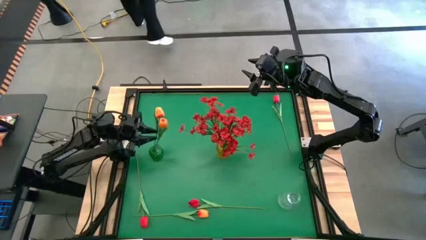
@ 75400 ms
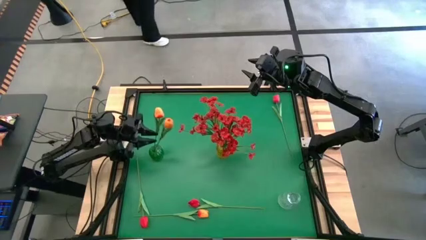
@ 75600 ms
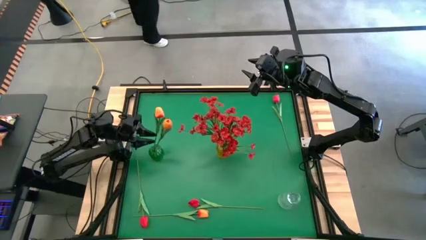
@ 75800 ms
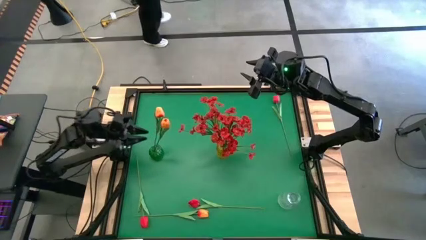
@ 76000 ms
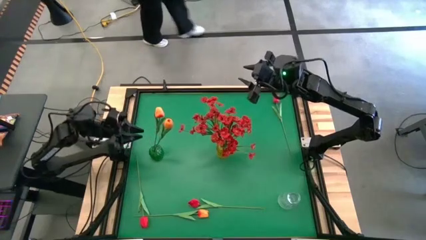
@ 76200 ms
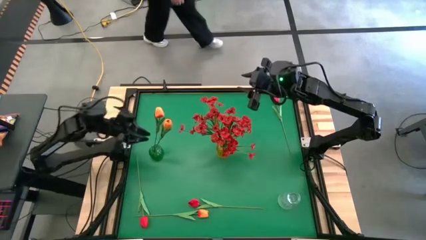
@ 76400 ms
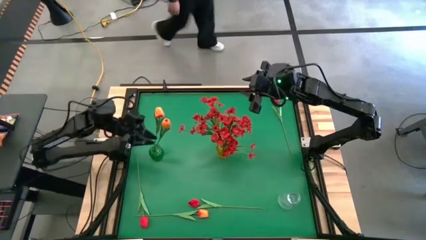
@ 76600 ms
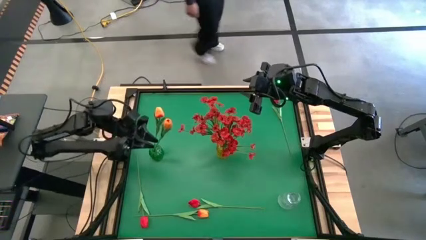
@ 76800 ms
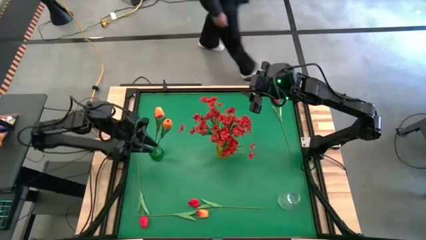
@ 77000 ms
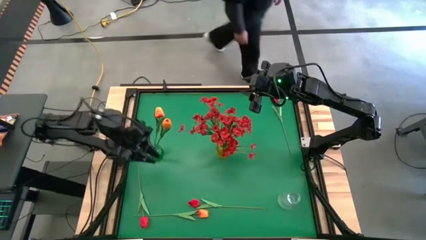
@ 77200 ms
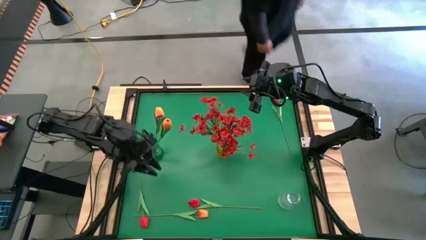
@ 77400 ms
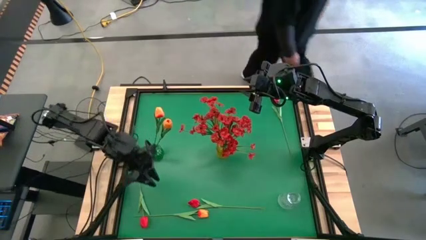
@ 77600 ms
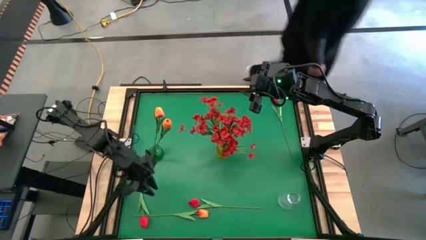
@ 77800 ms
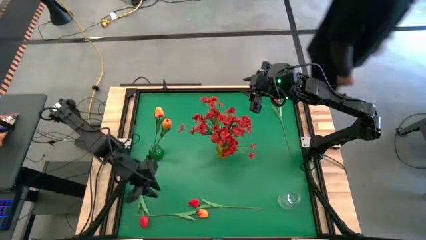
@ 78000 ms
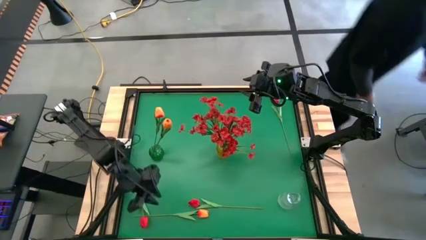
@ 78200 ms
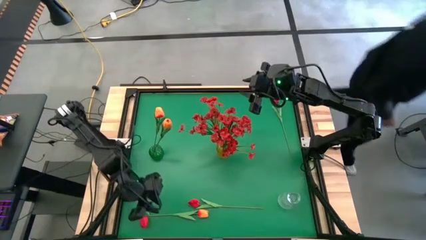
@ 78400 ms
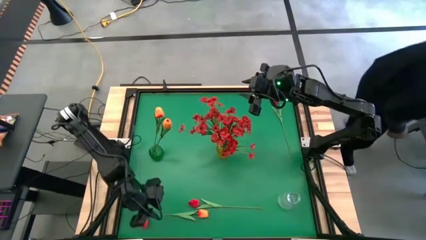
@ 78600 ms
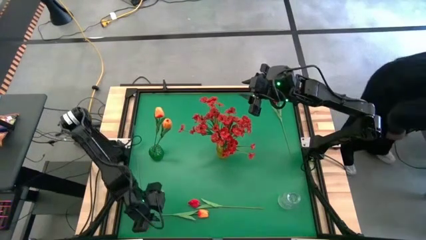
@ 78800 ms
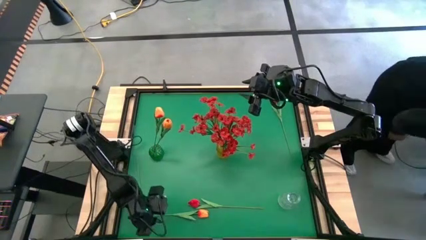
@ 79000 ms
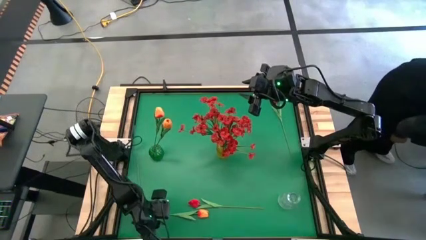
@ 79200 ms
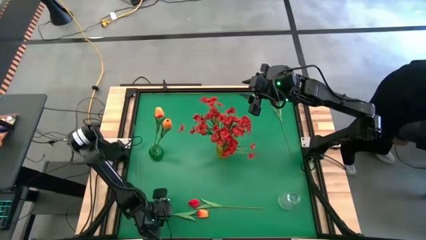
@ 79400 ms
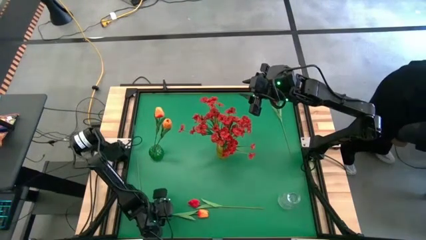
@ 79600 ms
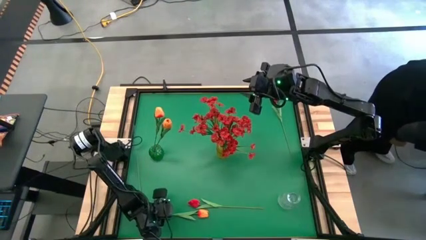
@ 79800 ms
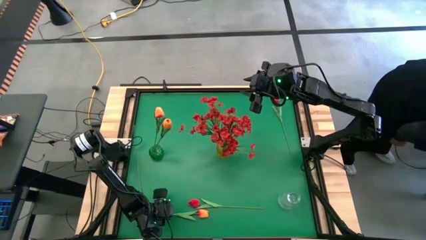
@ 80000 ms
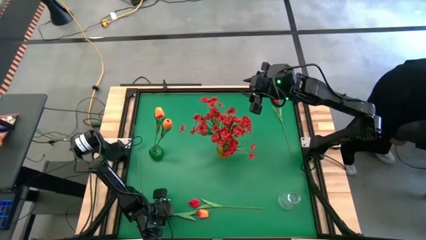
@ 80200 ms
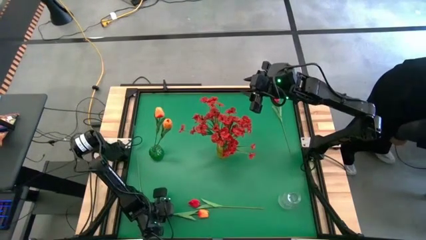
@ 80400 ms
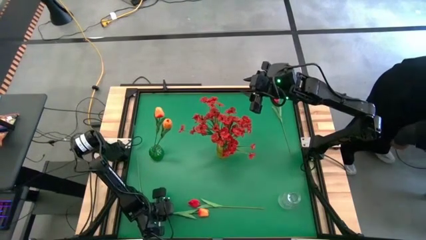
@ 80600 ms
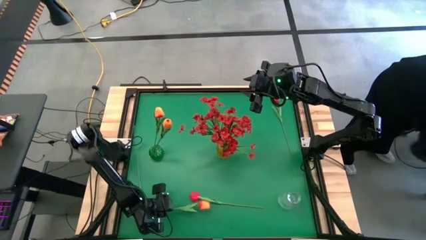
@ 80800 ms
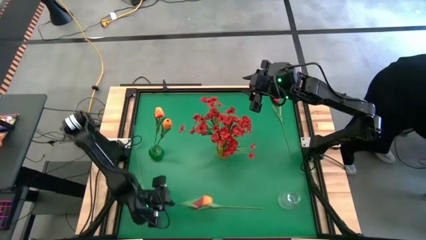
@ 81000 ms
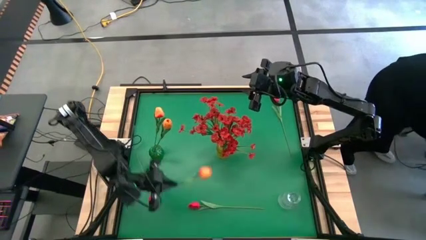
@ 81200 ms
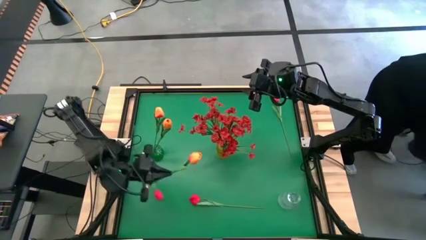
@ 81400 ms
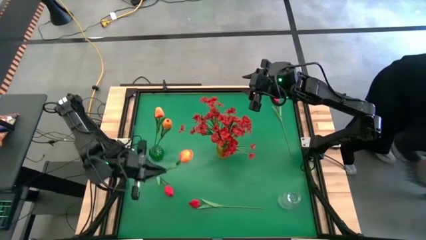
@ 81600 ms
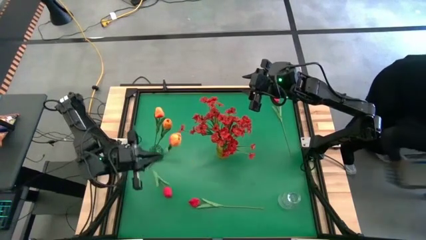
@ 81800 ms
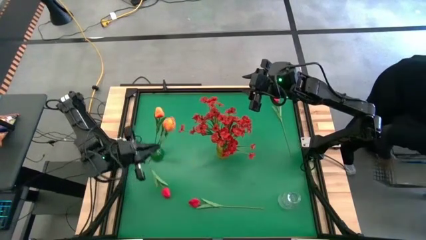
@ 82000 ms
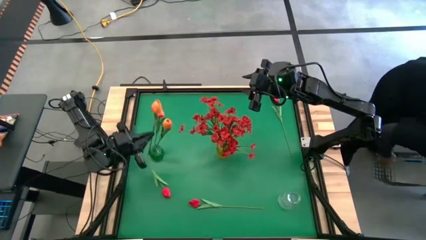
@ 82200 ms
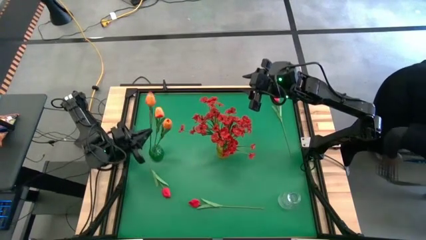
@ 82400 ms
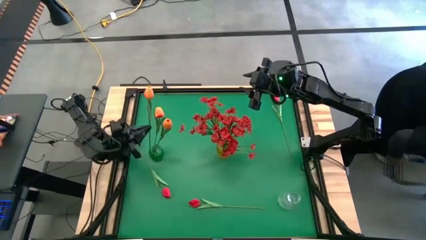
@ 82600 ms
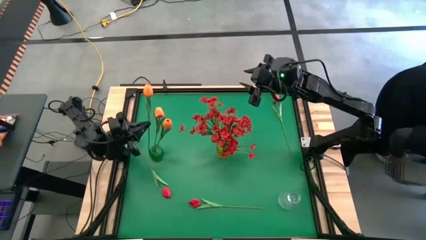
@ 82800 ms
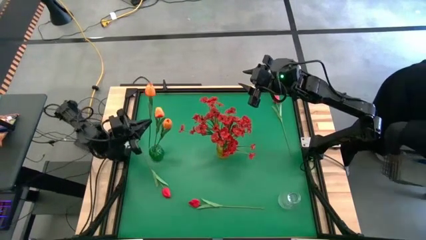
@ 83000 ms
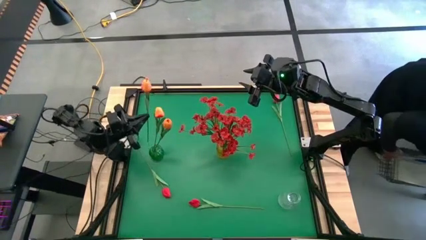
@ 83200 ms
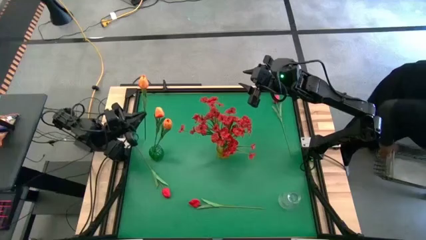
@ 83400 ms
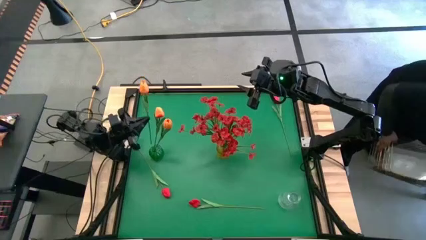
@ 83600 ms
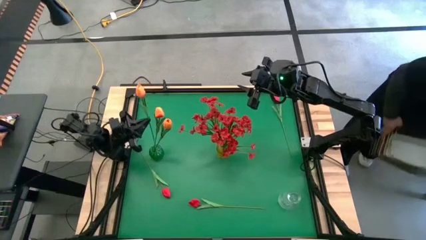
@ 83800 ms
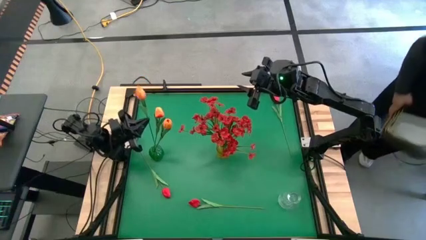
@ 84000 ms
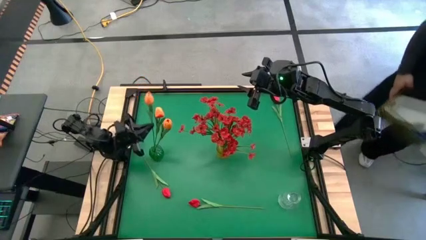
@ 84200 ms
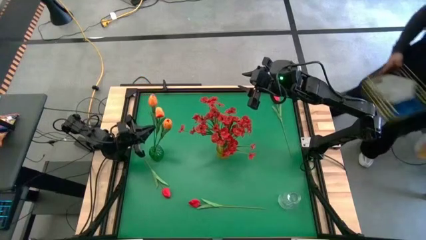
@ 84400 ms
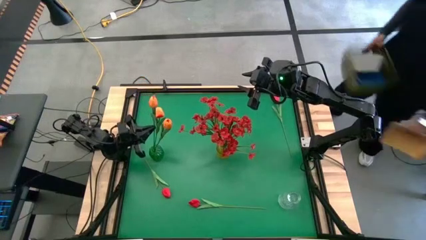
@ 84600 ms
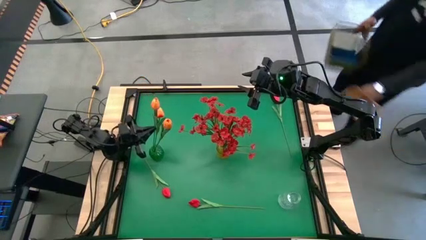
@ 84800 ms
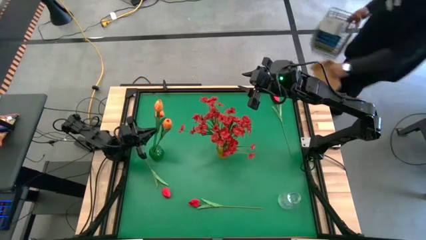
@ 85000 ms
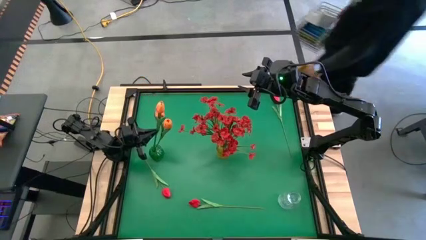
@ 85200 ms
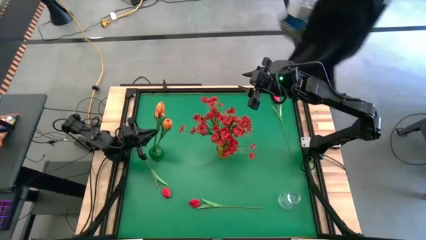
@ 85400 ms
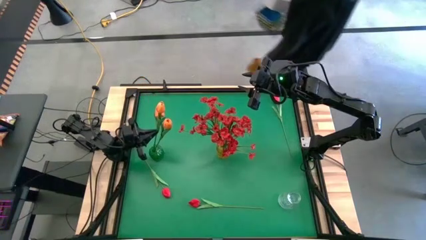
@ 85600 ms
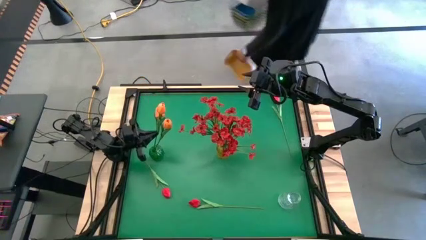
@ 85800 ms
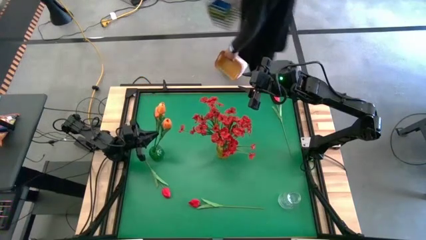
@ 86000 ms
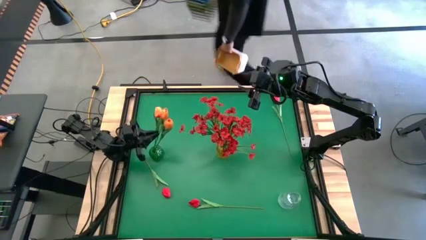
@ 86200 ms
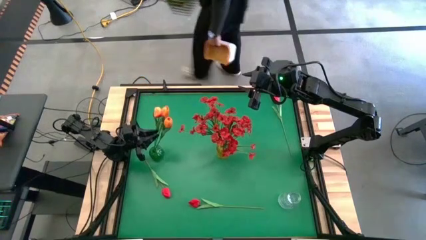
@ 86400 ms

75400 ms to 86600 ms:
Task: Sort flowers into vase by color
Put the orange flower into the green vase
